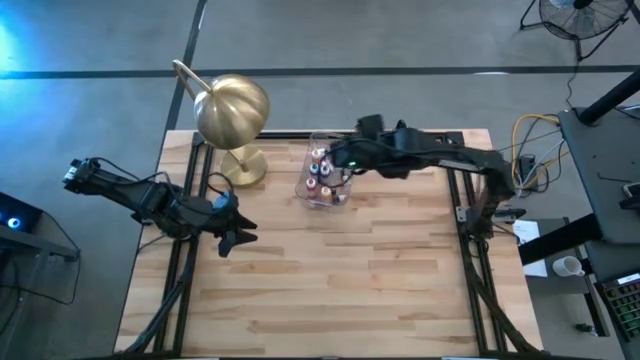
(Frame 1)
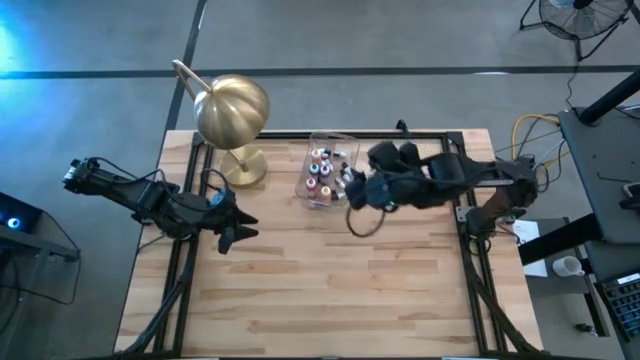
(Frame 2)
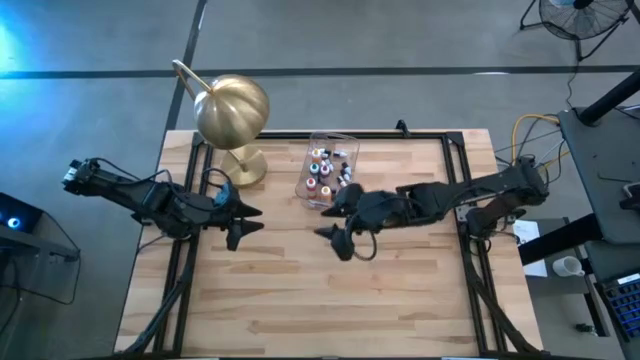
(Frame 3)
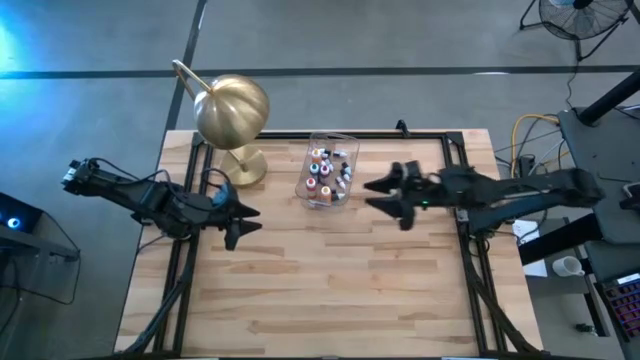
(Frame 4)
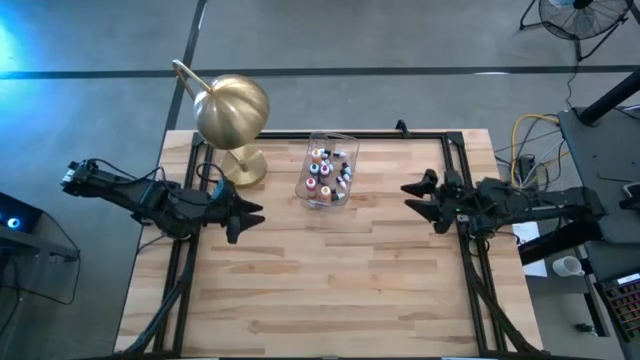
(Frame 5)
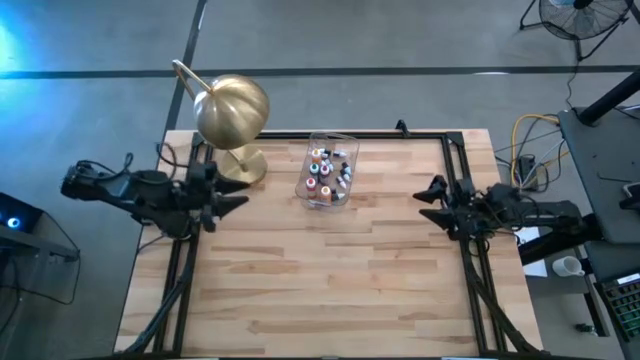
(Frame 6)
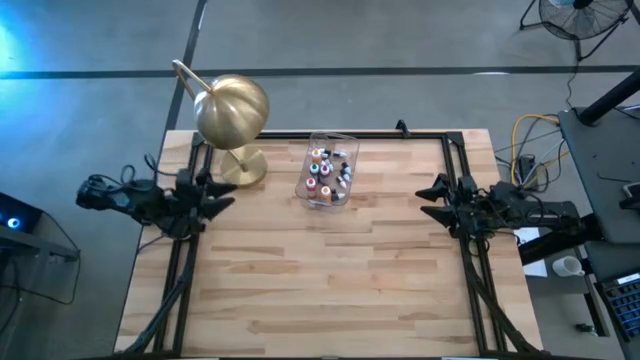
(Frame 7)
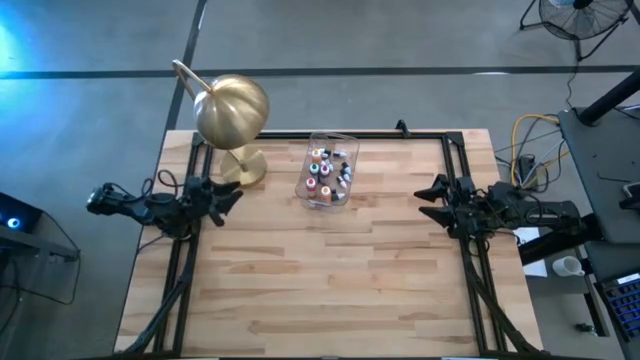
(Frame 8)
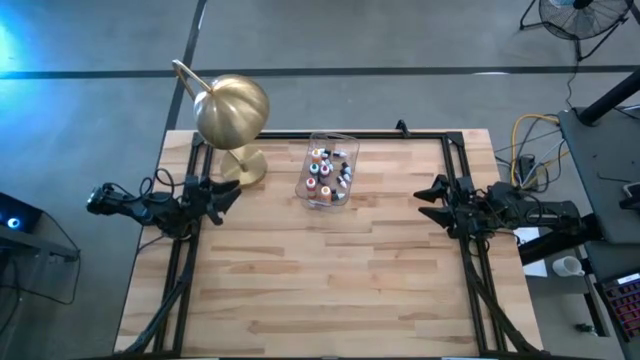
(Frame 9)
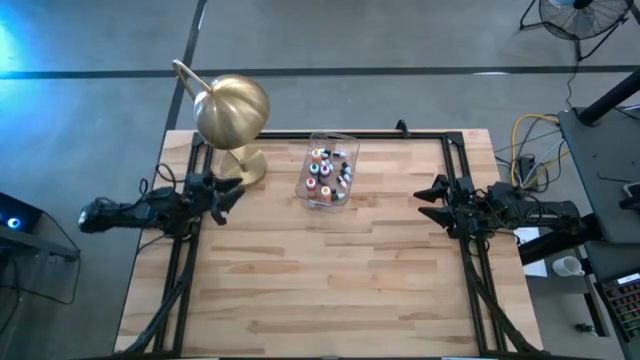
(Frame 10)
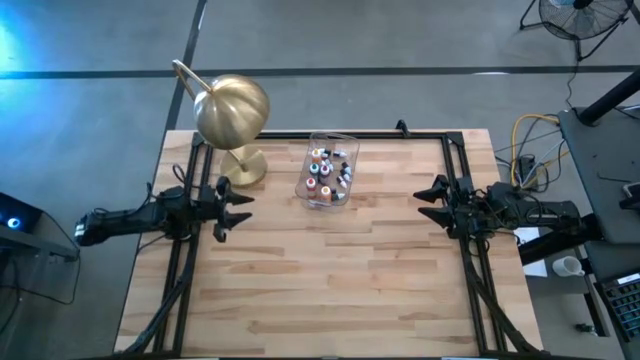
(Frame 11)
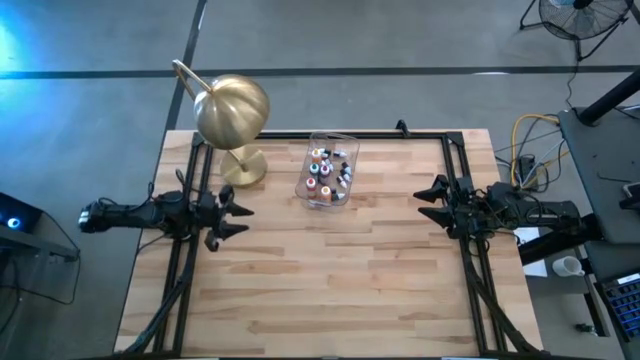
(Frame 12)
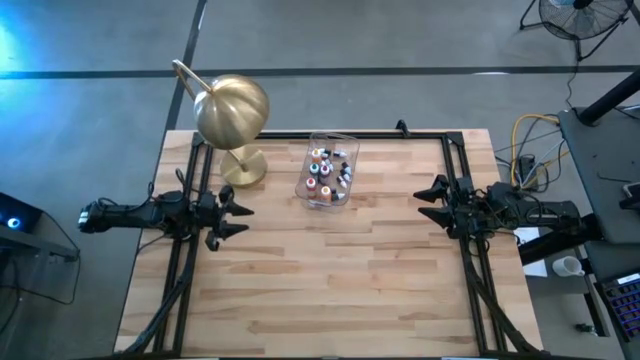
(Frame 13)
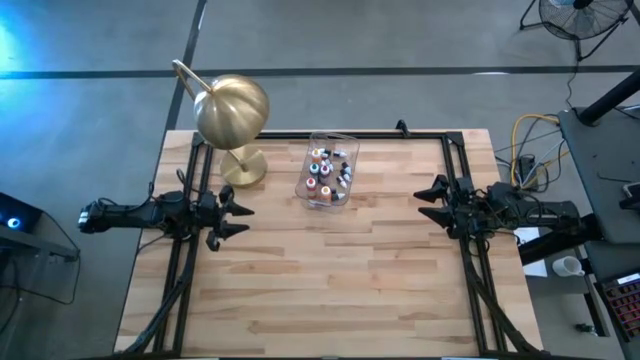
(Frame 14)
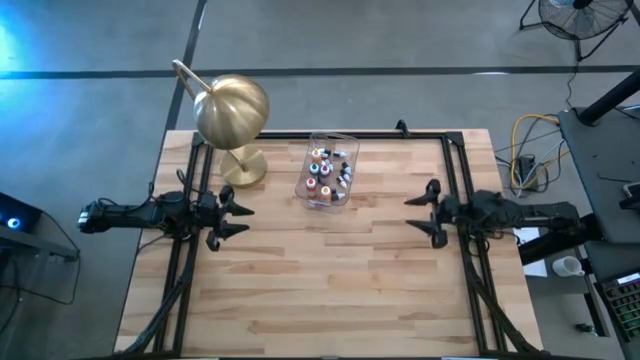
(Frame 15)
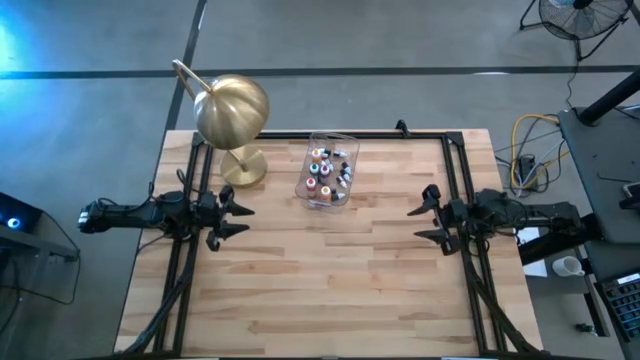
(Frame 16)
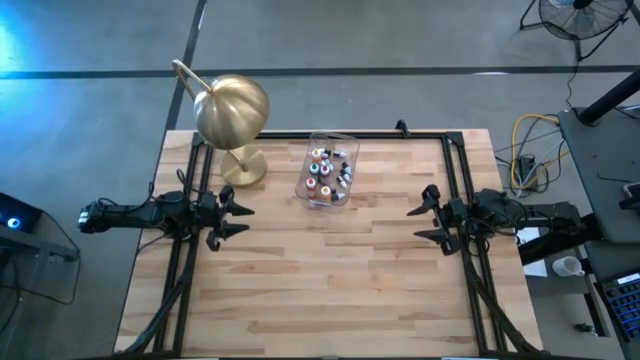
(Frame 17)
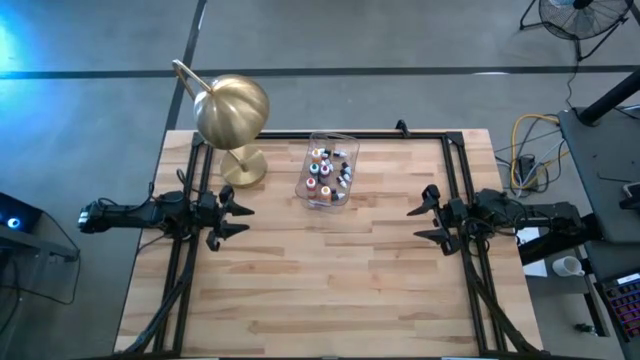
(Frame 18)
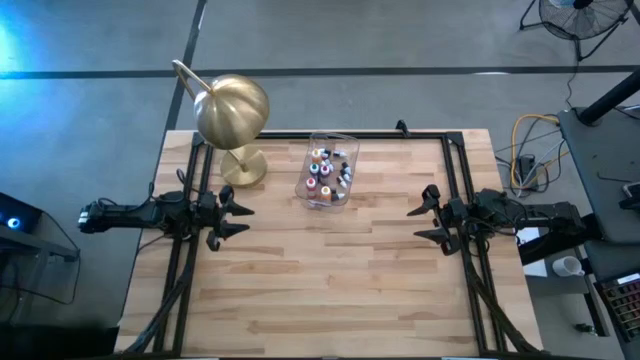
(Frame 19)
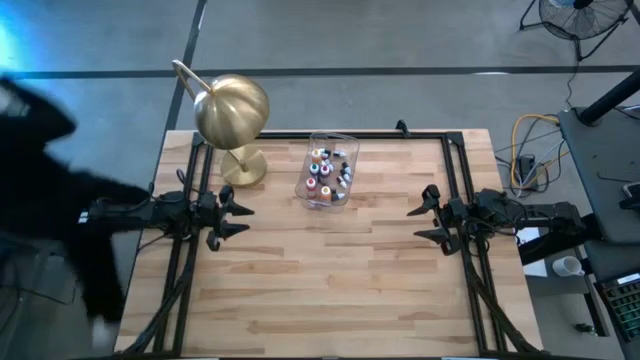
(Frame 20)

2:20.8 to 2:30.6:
Task: Pick & Place food coloring
Return to Home Position

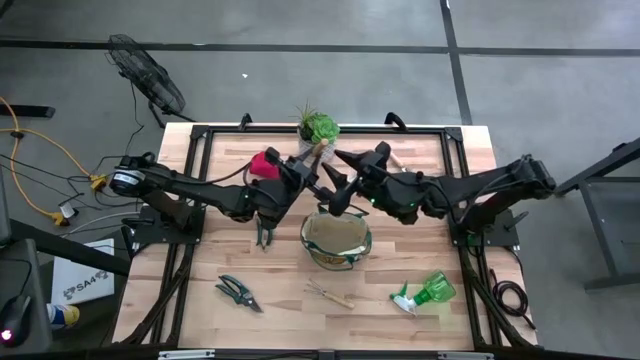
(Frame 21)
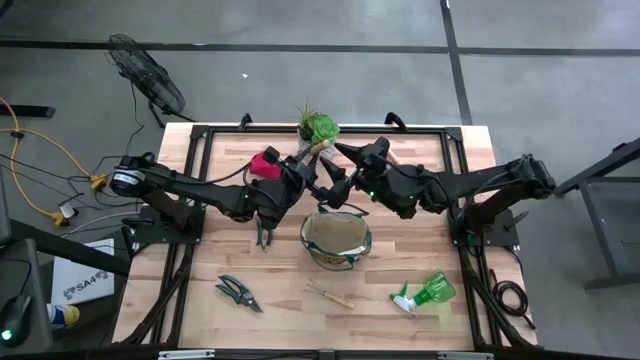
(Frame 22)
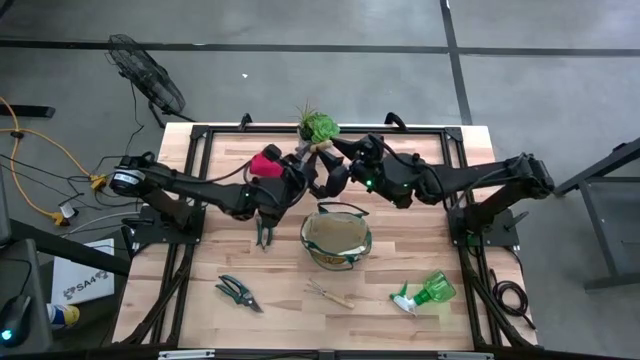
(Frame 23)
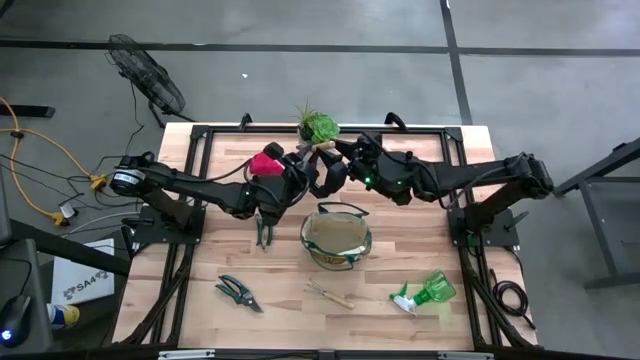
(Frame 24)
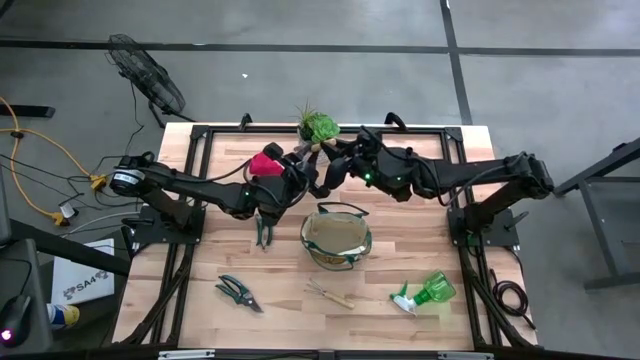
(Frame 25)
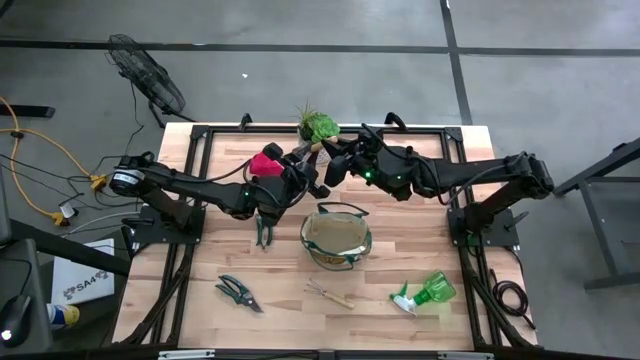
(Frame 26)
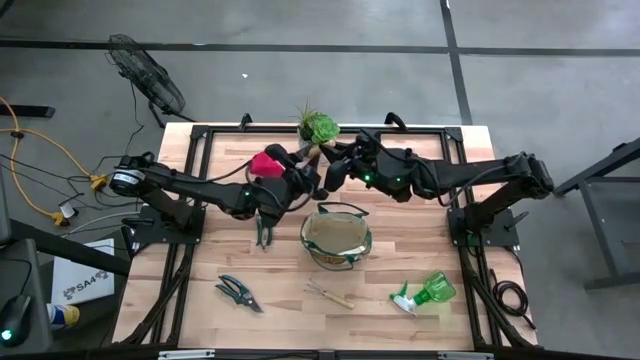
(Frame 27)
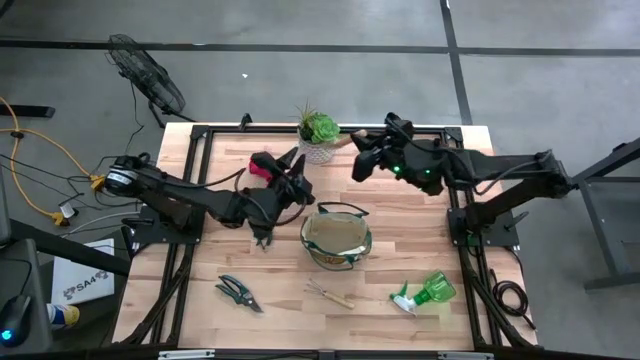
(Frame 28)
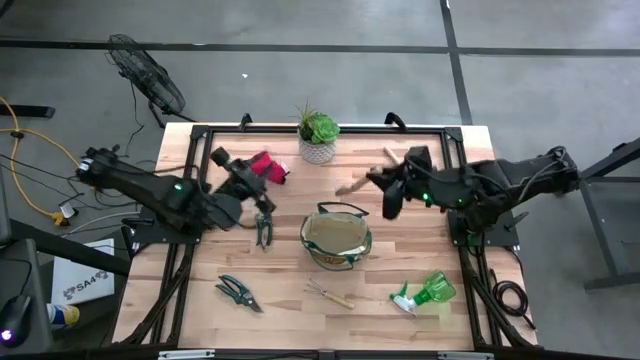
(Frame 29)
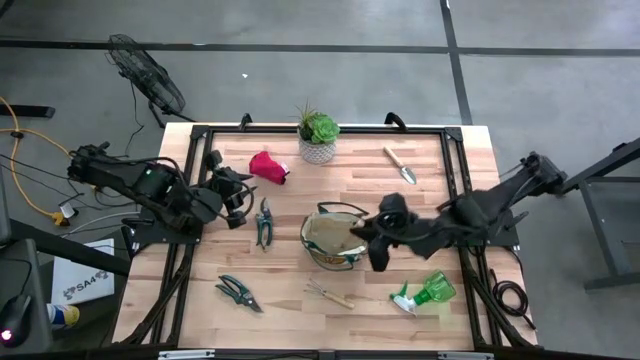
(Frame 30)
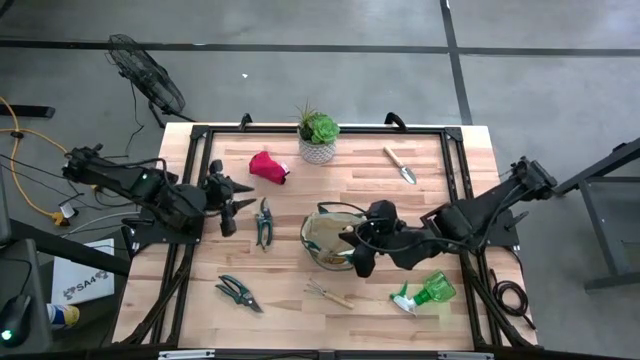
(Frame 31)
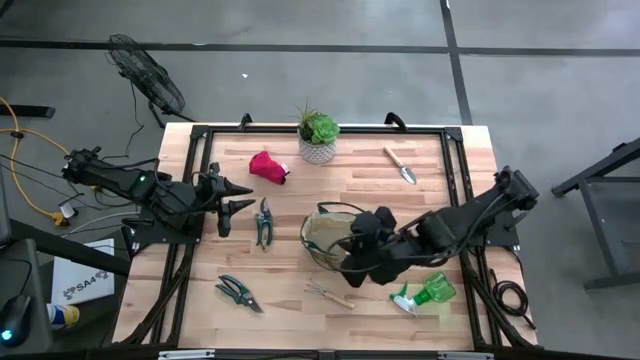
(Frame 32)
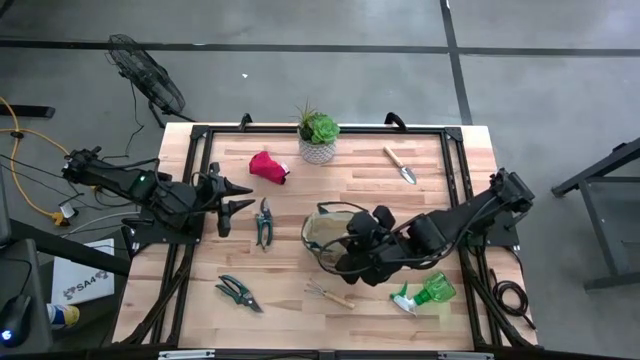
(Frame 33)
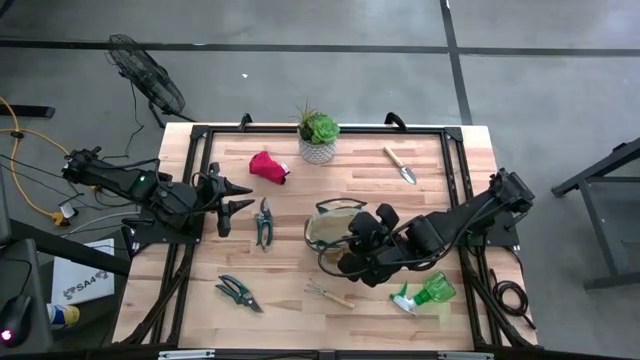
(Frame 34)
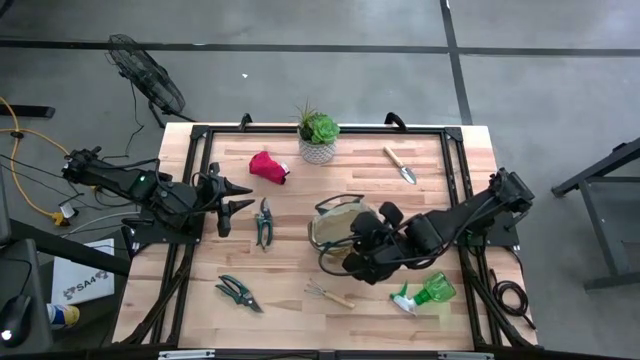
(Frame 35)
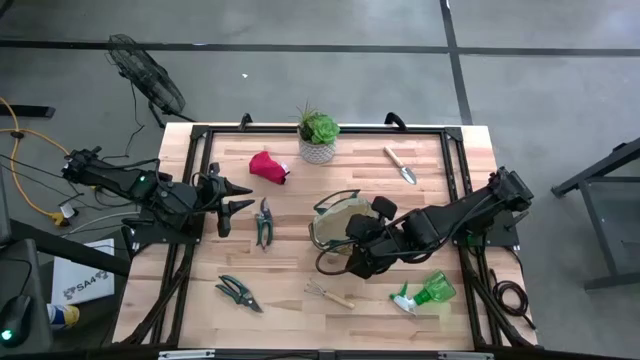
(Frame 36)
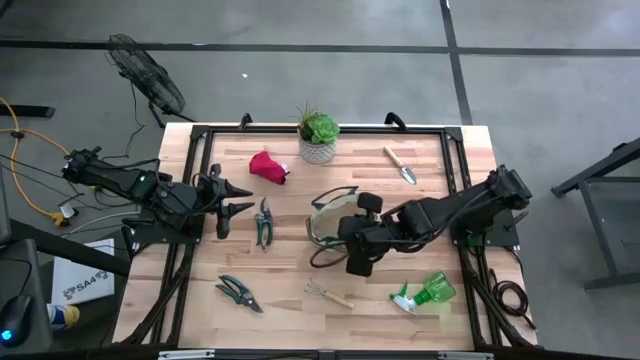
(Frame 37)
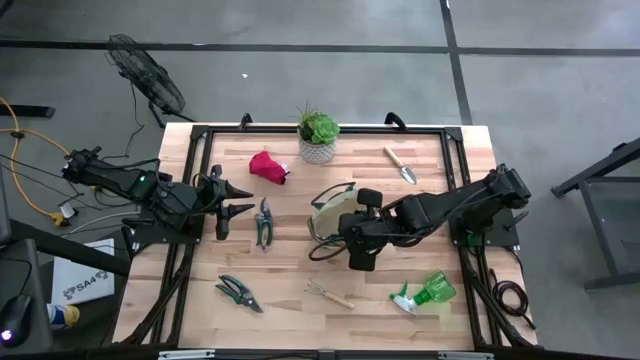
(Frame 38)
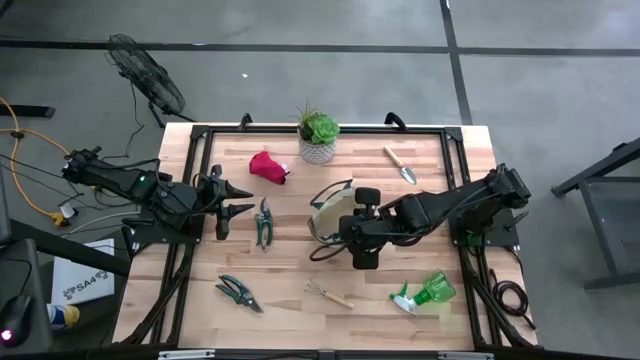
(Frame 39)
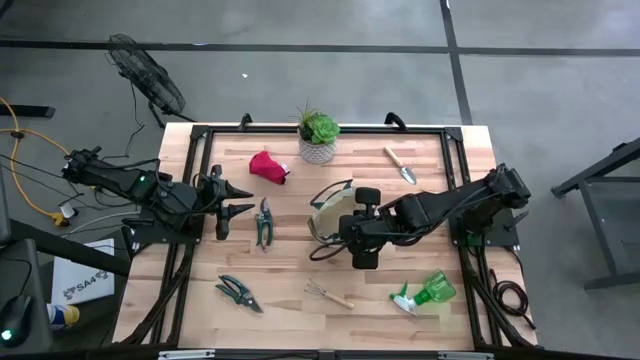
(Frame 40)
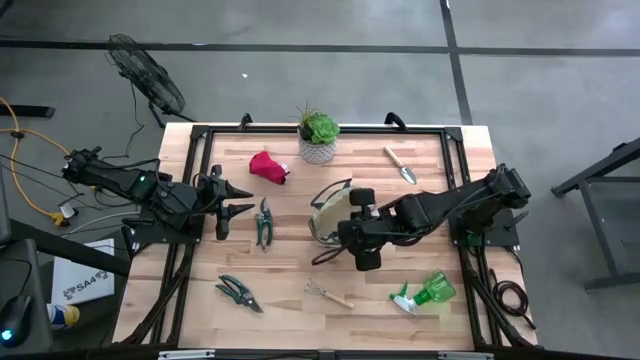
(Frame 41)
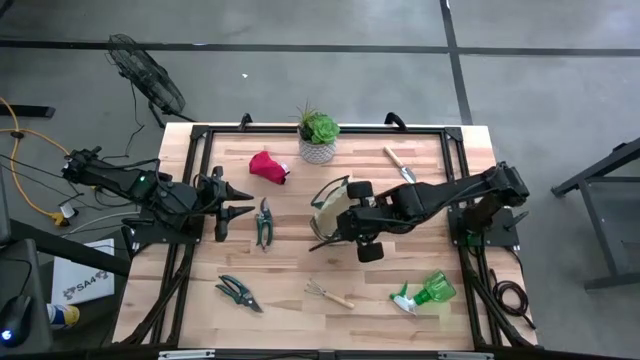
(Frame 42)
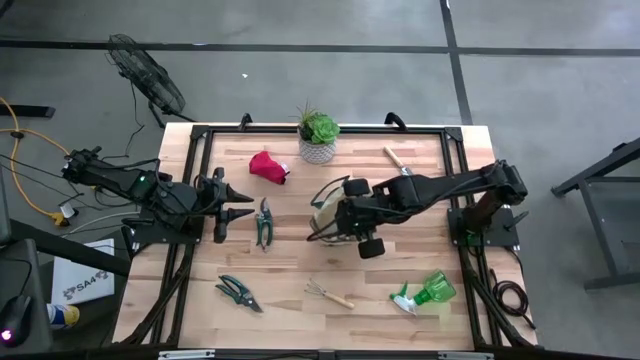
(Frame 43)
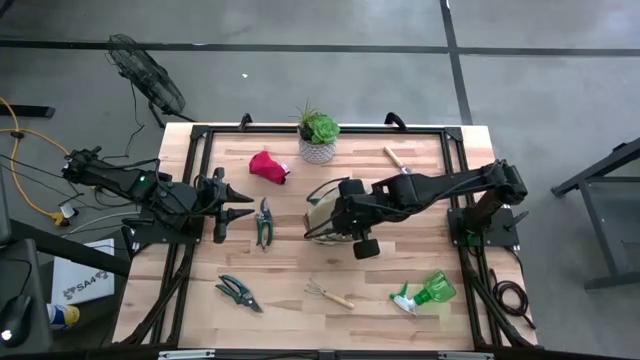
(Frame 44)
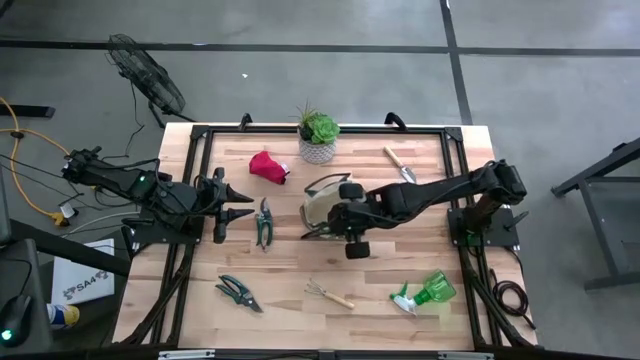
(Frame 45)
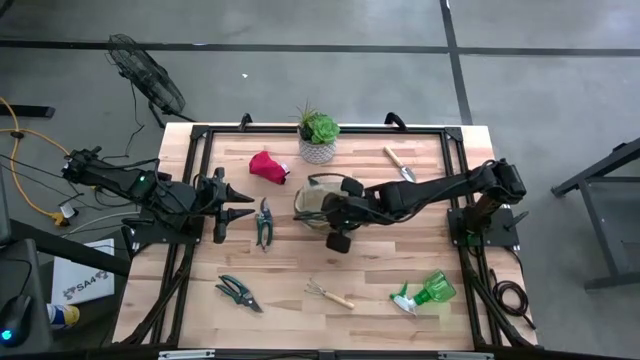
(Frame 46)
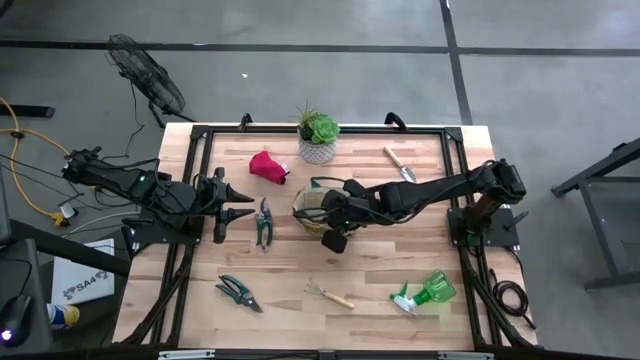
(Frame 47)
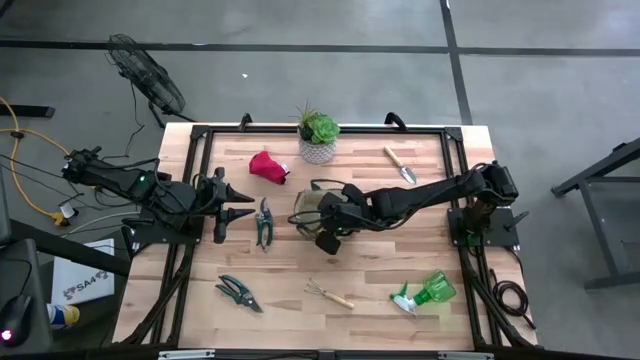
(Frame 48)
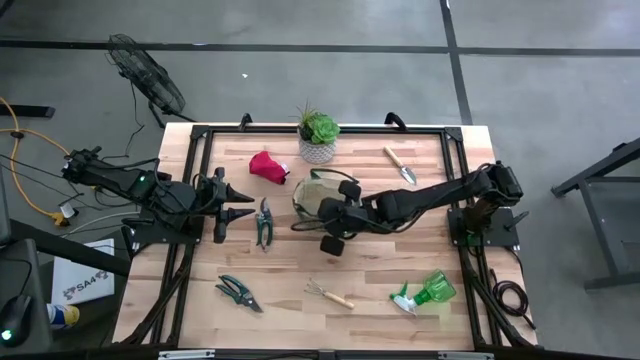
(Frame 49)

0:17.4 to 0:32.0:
Task: Pick & Place Garden tools in Gardening bag
Put the bottom brown trowel into the gardening bag
